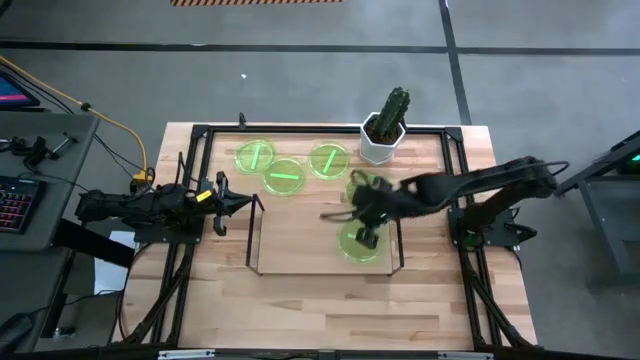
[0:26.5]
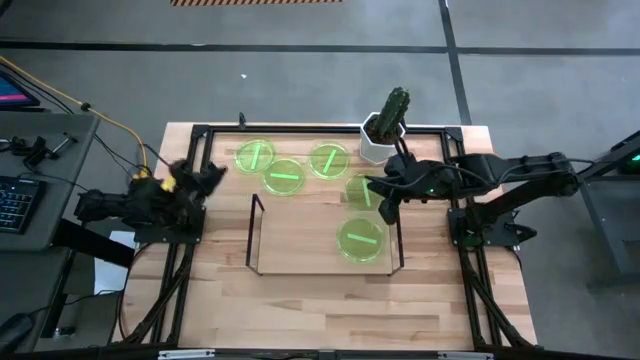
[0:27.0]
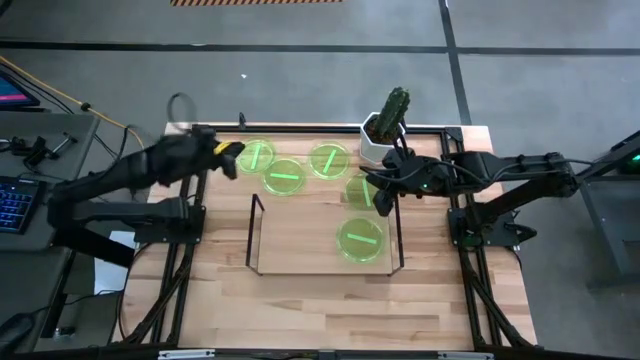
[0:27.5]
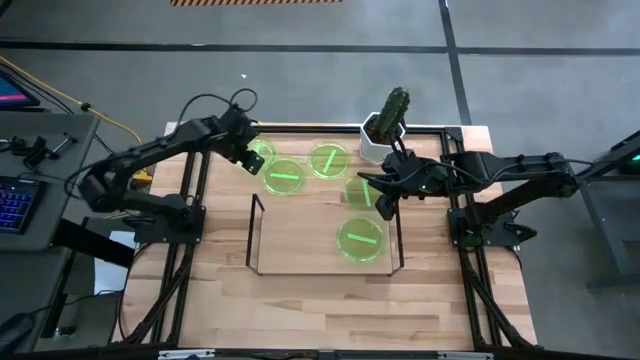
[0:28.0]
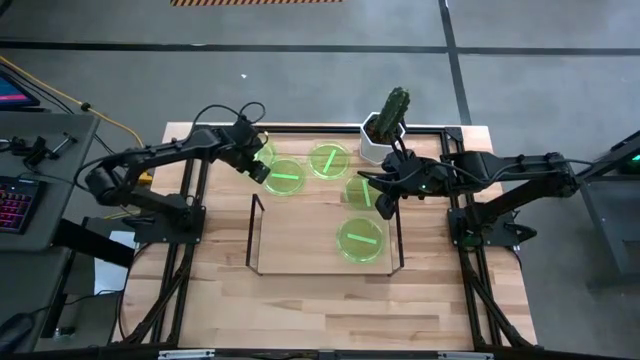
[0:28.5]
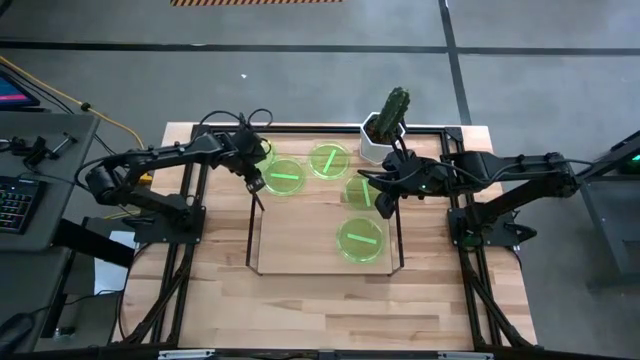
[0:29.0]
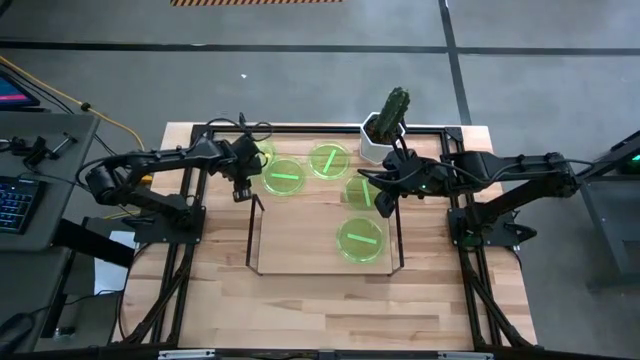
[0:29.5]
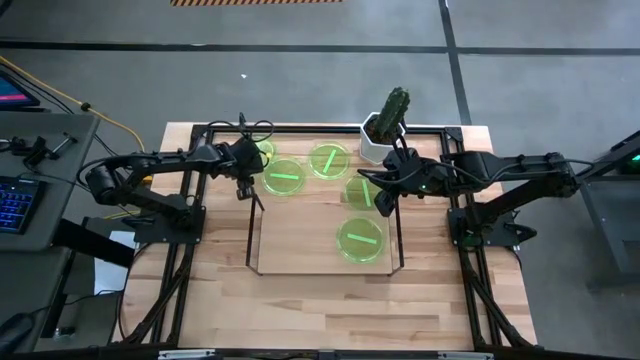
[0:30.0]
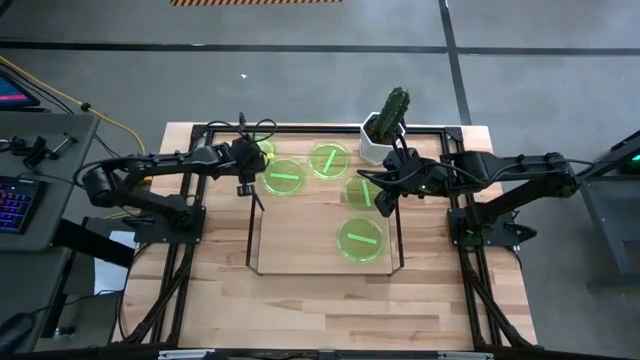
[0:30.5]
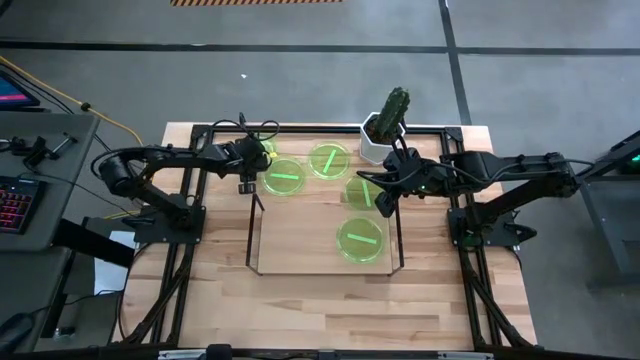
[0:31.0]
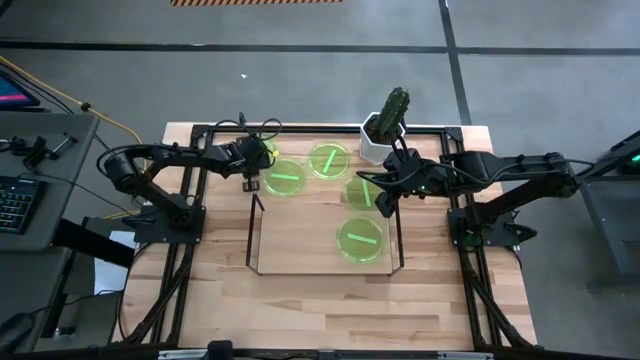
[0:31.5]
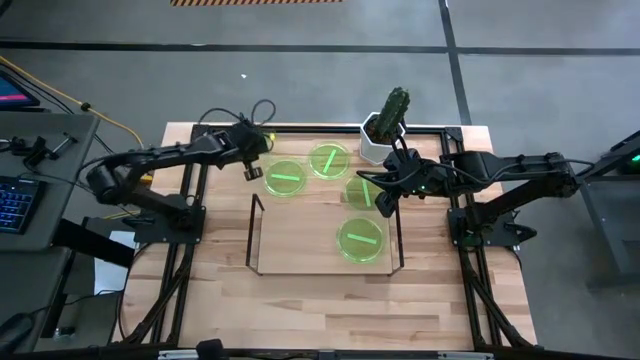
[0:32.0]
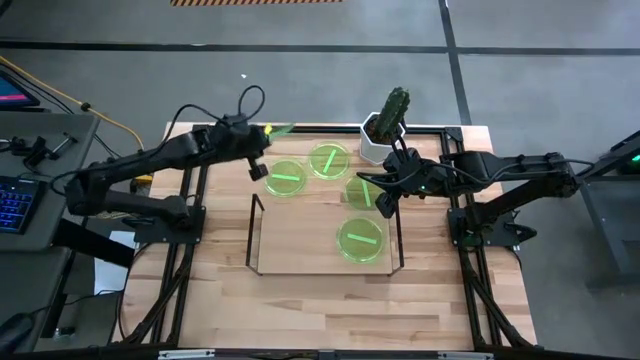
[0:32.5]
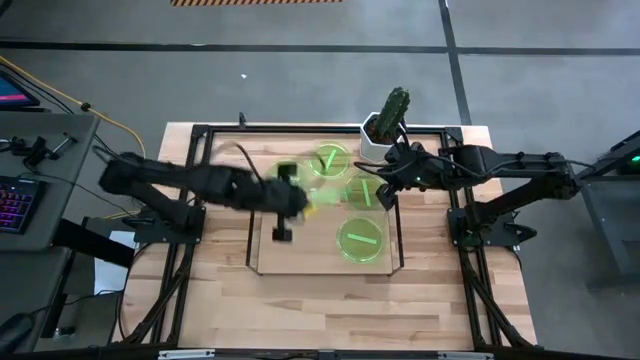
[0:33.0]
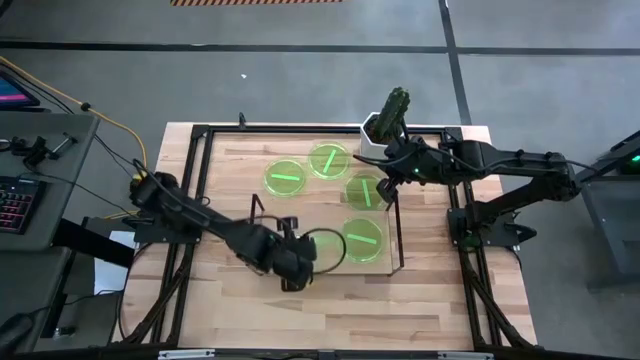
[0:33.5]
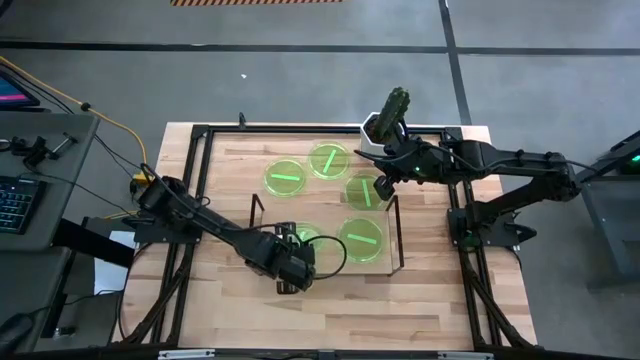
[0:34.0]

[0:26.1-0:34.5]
Task: Place and stack plates onto a shelf
Put the green transparent plate on the shelf

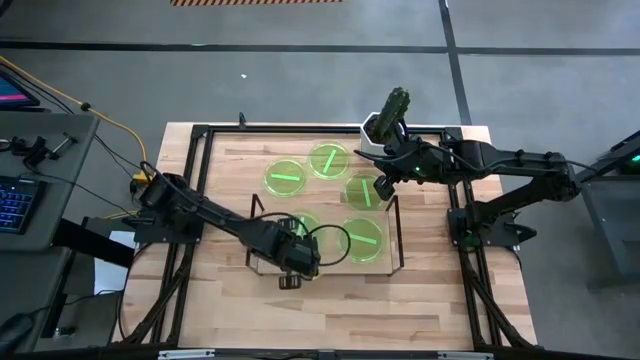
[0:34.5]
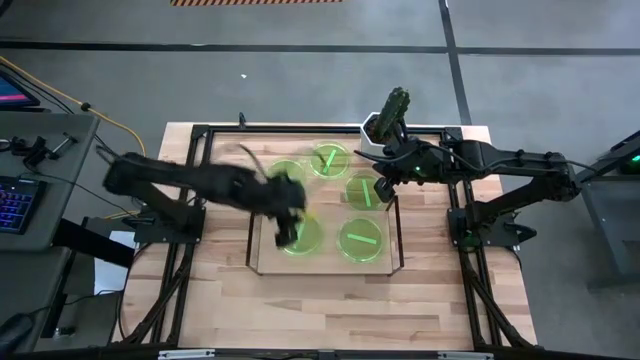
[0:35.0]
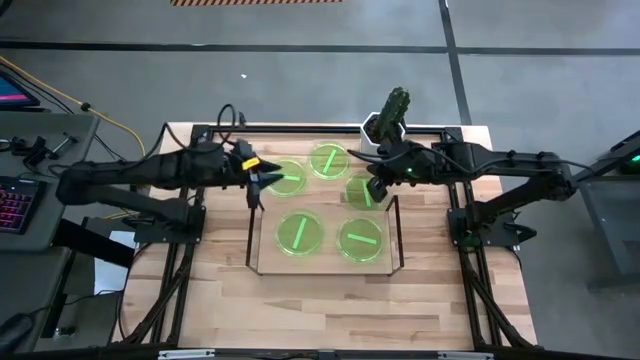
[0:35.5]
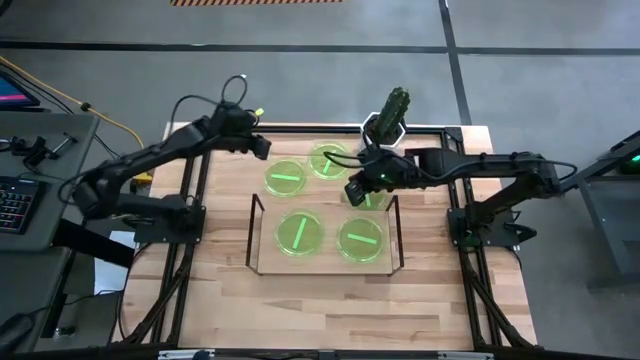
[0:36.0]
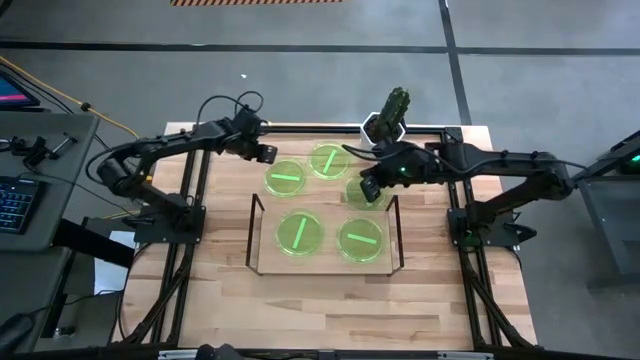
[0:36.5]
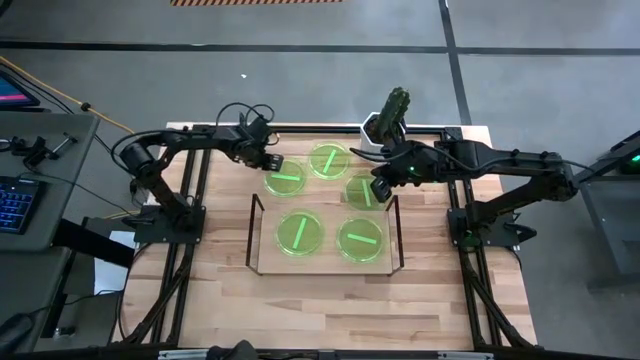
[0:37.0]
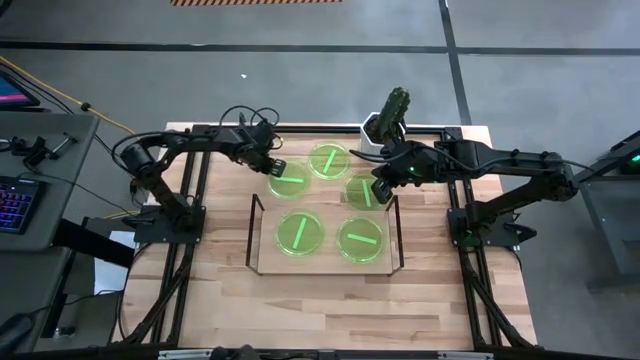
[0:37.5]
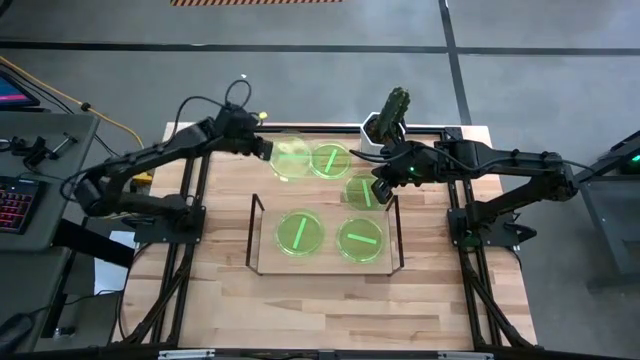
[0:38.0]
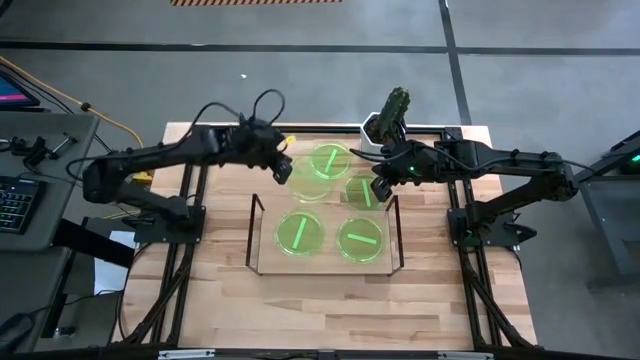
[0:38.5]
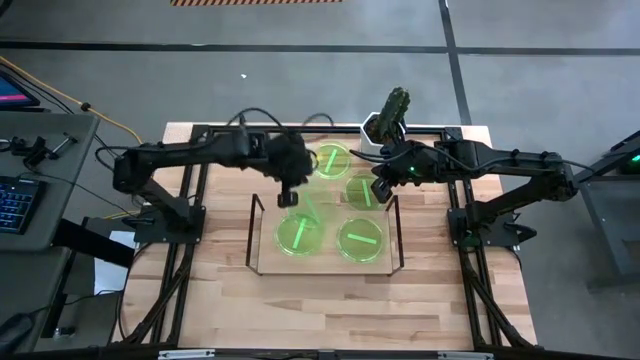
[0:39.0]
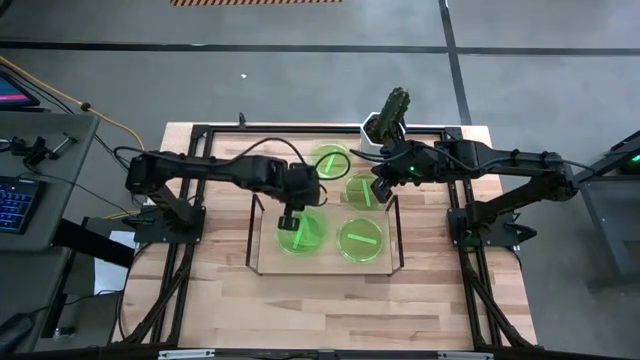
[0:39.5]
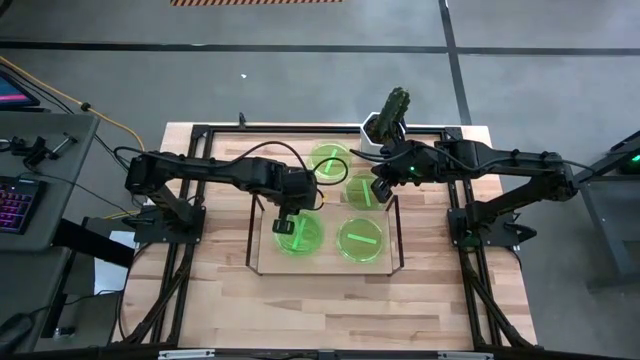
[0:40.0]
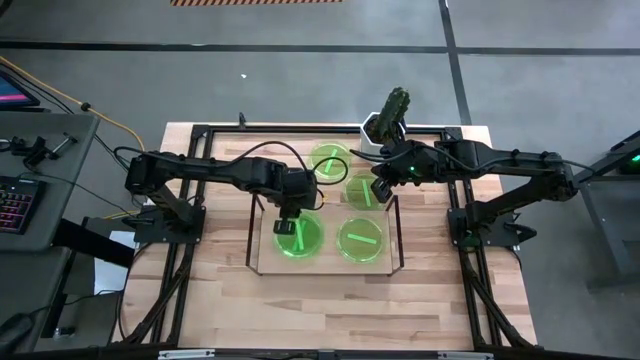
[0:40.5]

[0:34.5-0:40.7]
Stack the green transparent plate on top of the green transparent plate

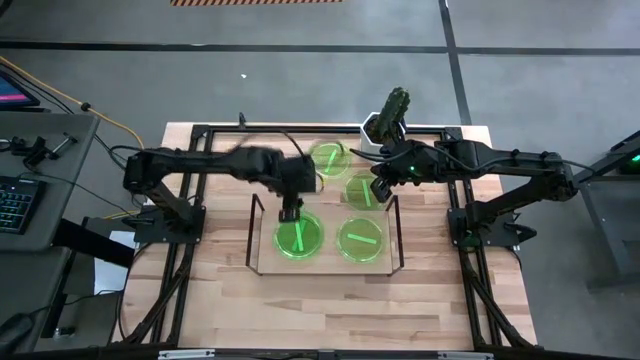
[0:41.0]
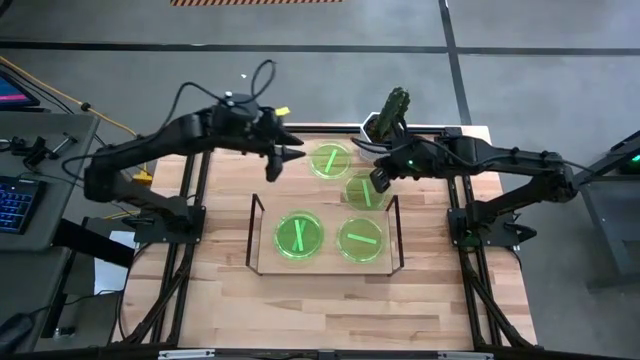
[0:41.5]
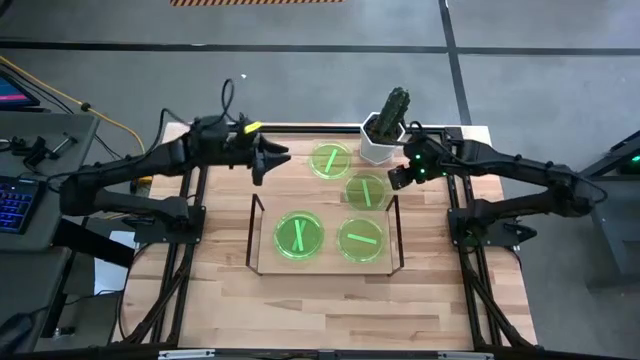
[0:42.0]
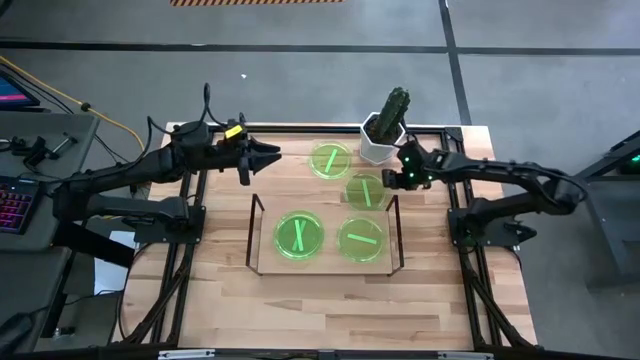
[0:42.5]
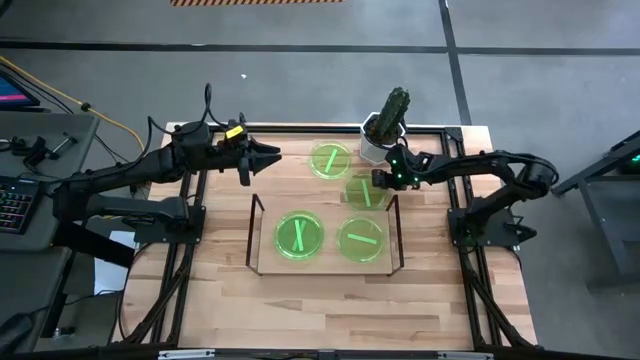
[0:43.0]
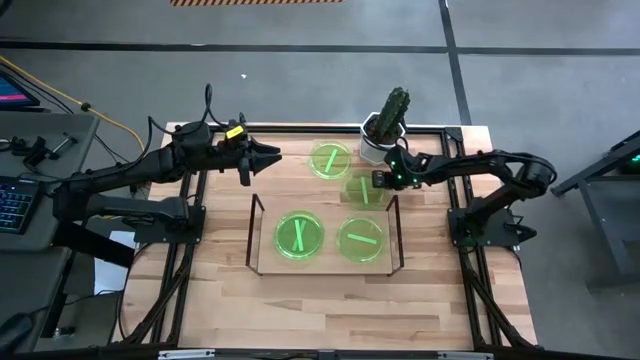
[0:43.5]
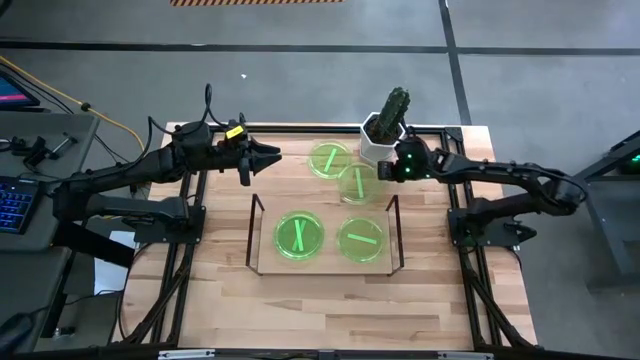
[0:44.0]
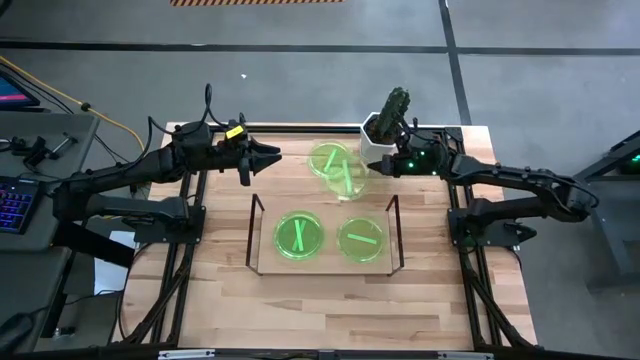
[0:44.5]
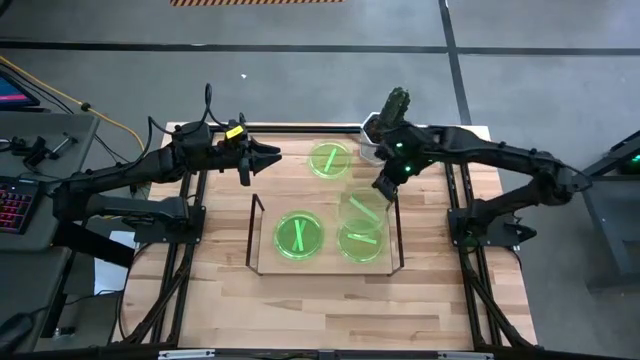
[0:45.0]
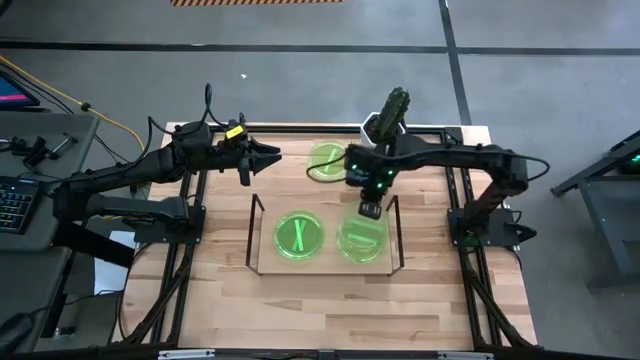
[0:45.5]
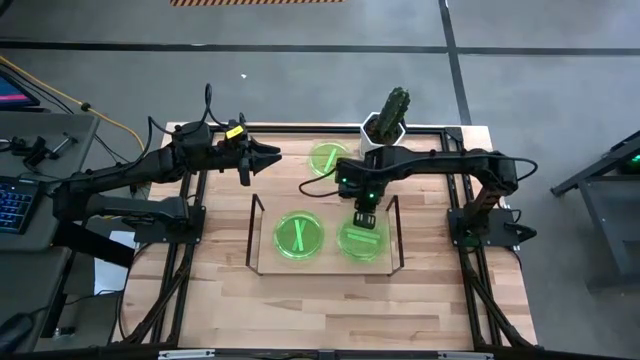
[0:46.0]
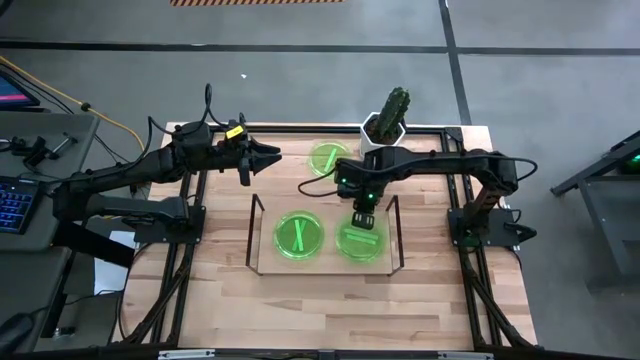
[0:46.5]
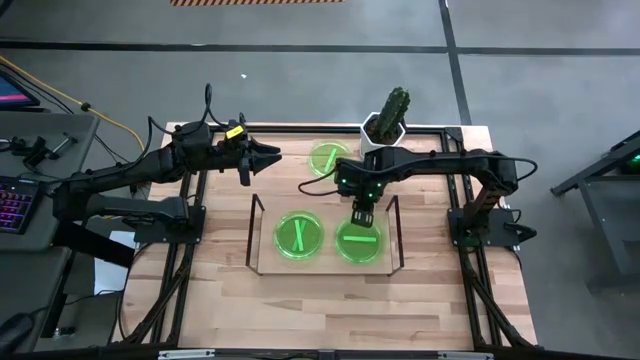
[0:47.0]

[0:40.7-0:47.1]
Stack the green transparent plate on top of the green transparent plate
